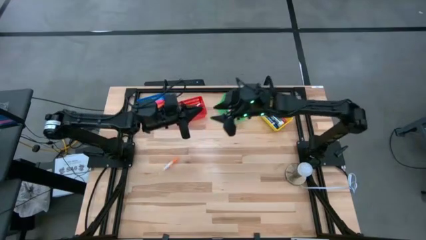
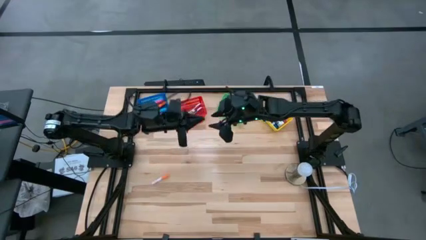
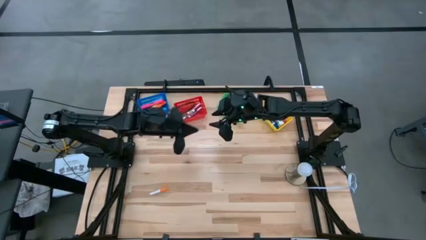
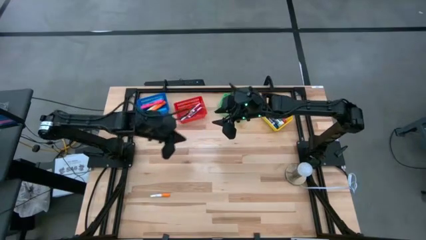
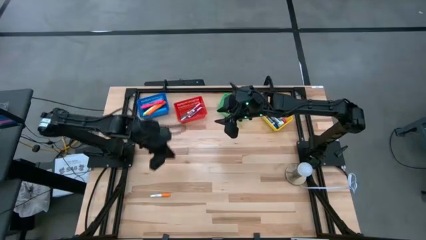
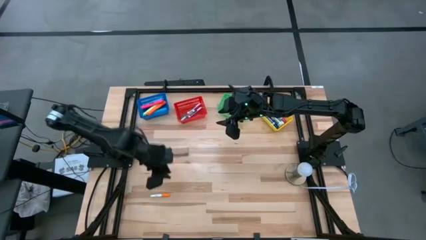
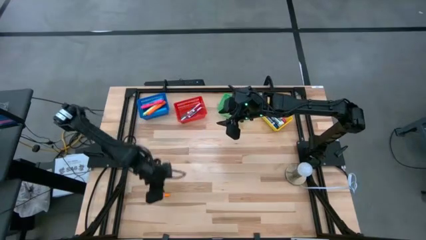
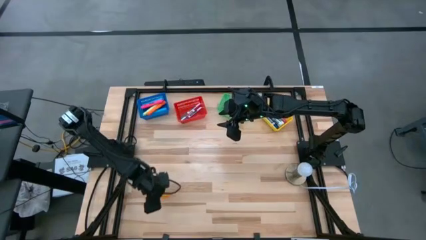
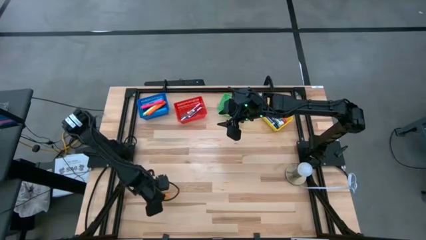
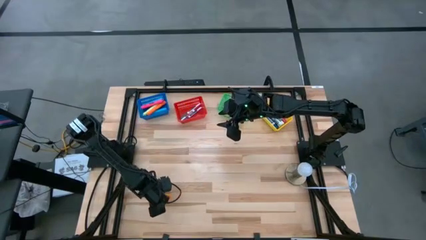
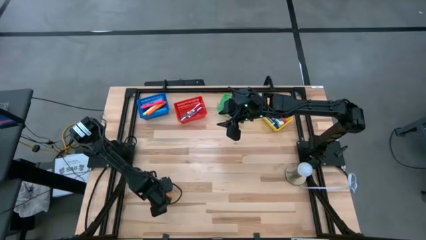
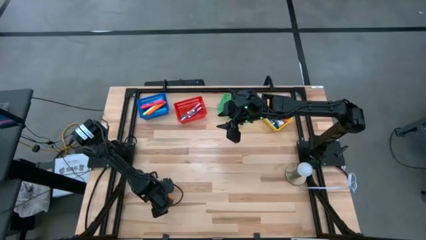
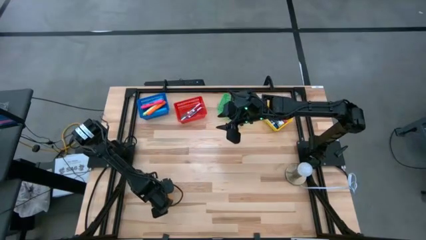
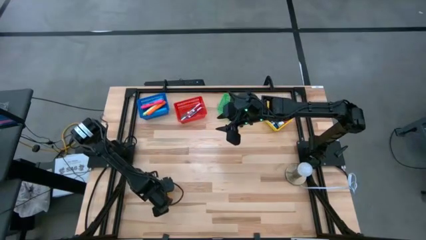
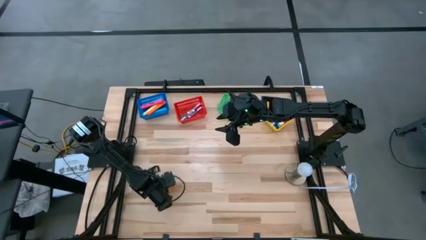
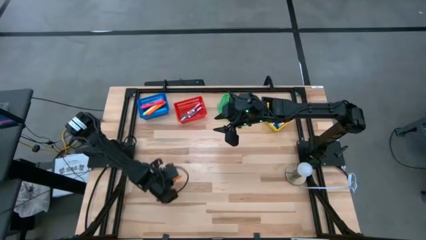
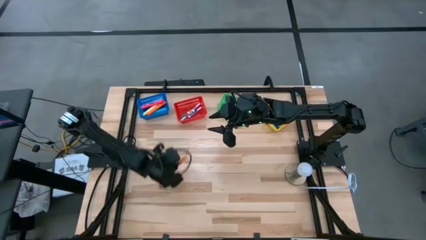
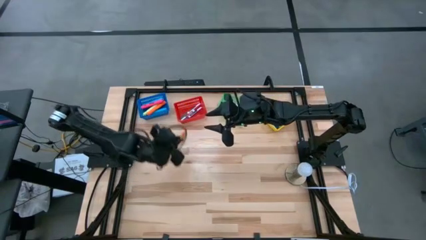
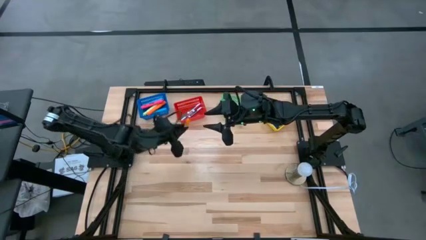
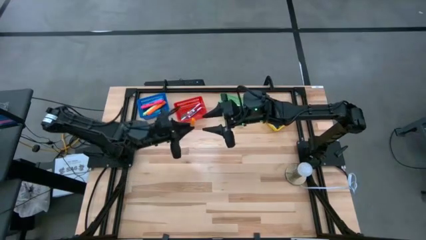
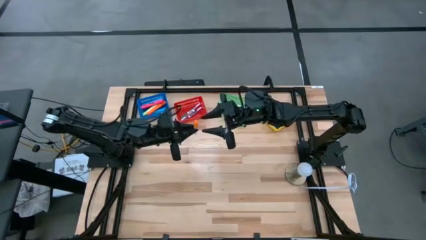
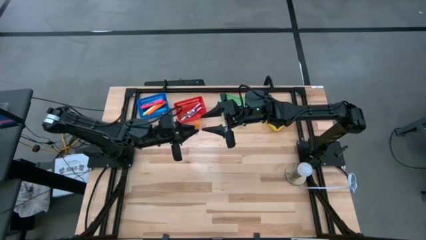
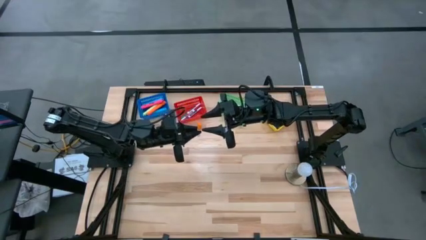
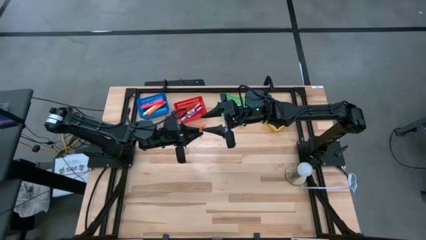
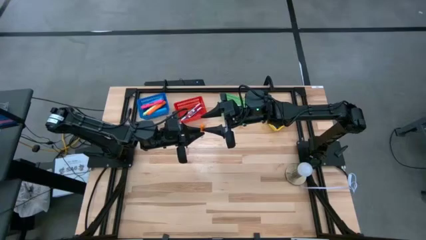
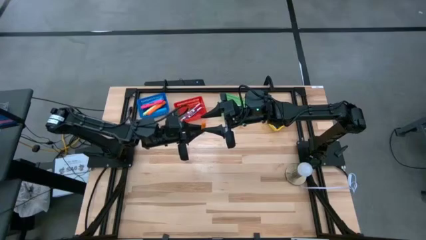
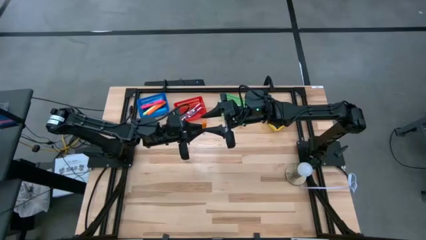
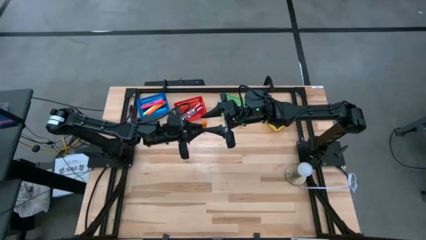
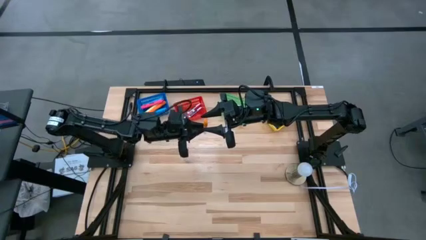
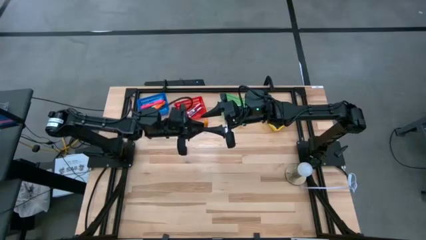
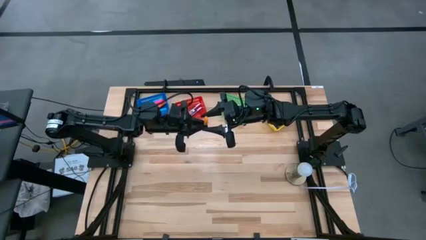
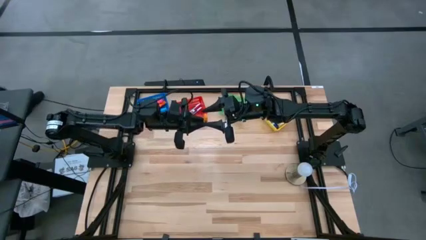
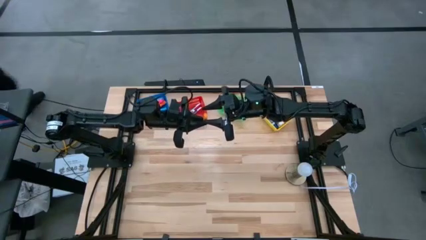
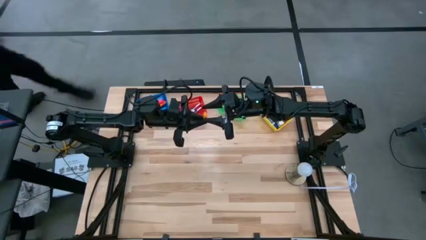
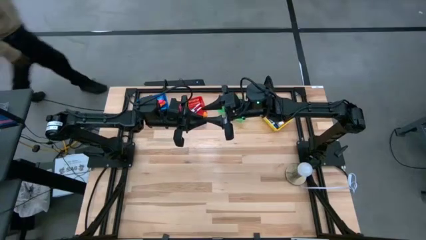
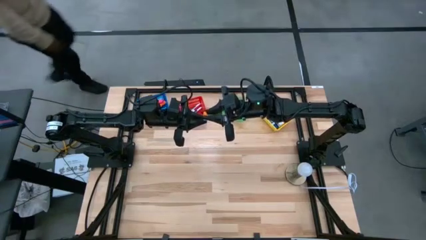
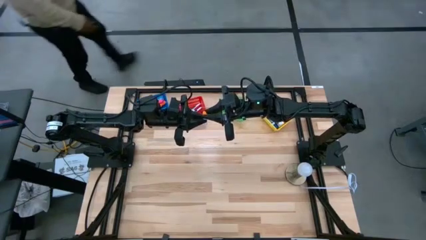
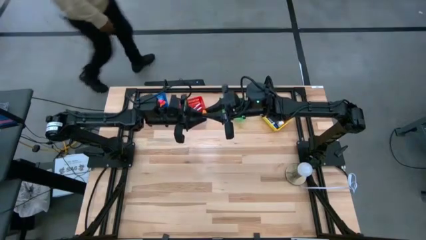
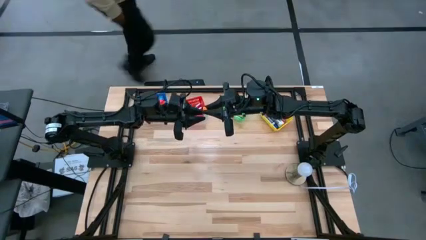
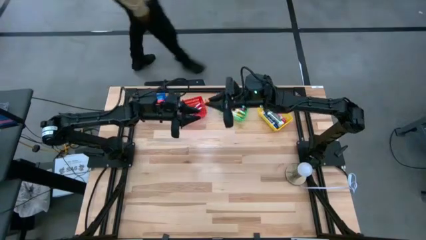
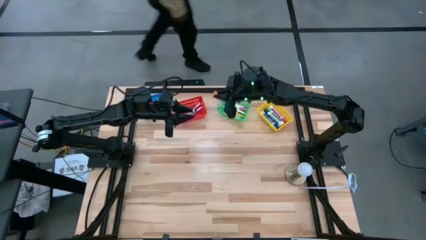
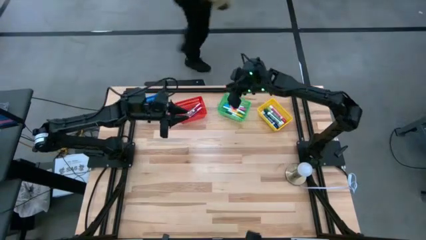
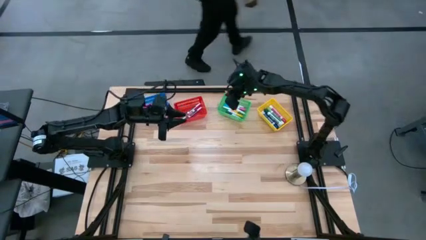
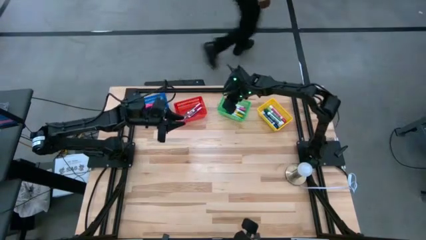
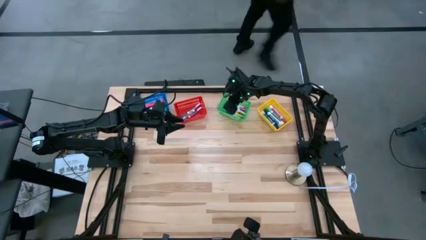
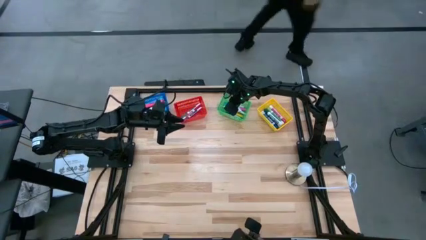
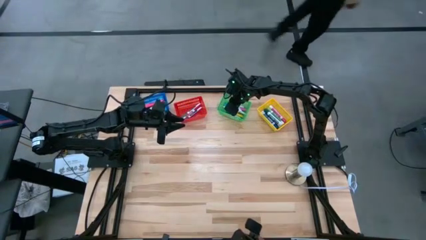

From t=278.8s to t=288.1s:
Task: Pick & Place Markers
Put the small orange highlighter pen into the green bin

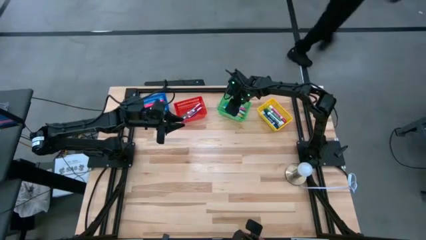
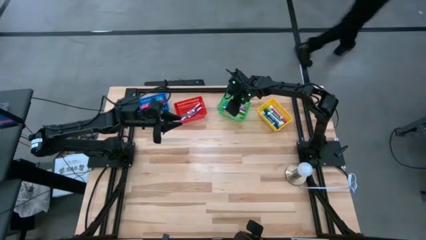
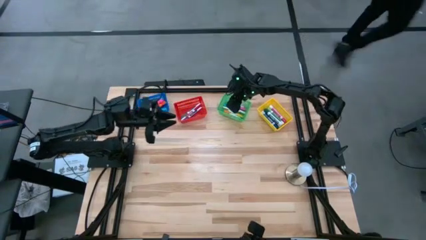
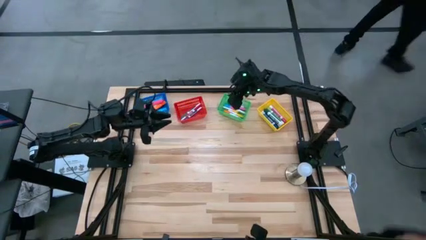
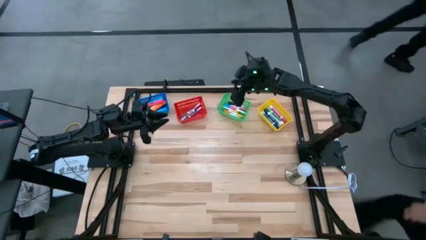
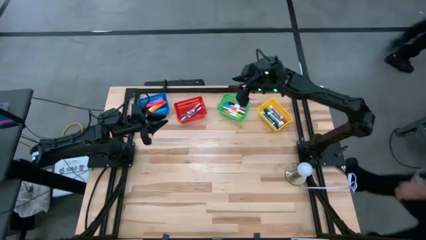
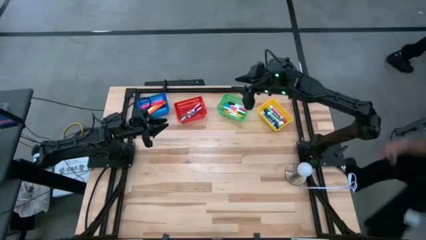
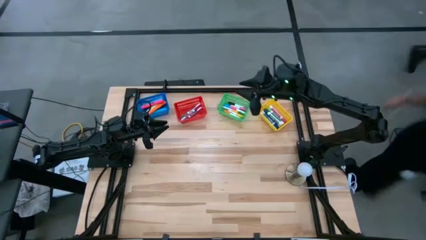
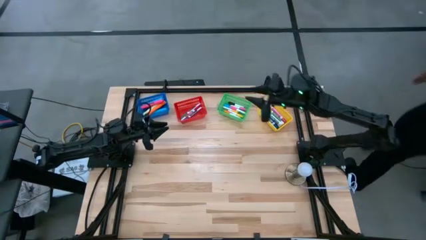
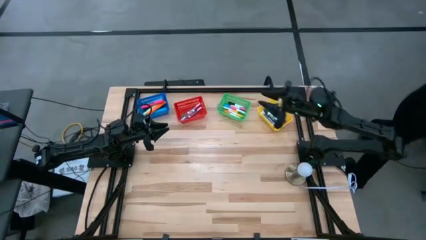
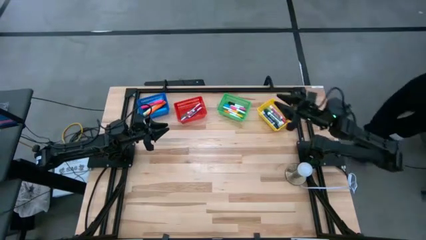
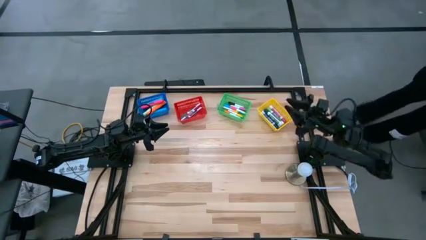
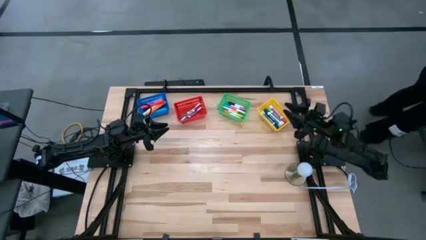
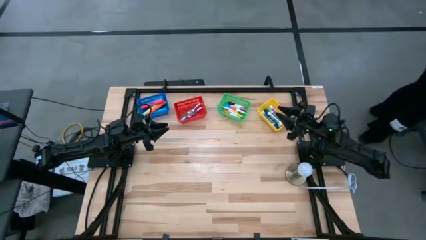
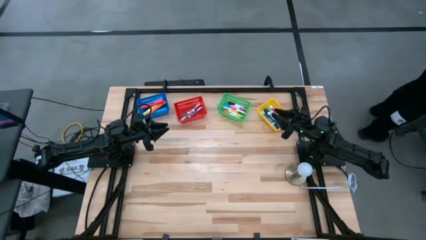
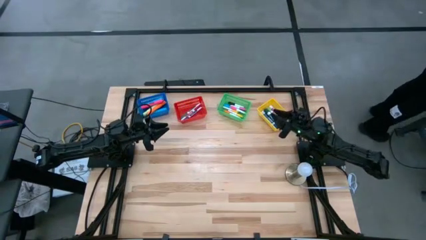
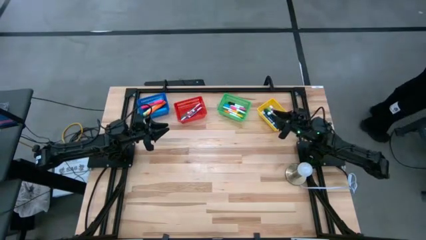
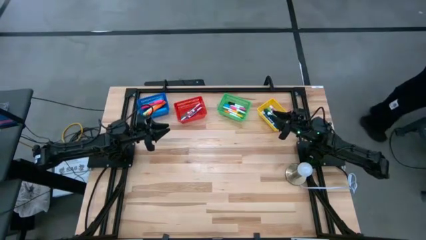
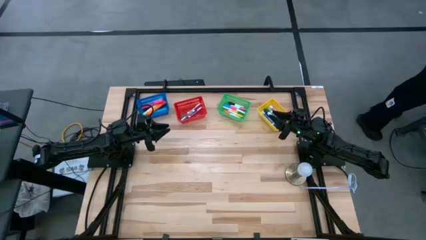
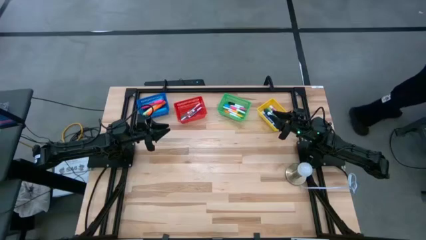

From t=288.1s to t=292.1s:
Return to Home Position

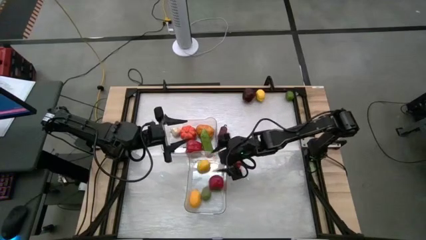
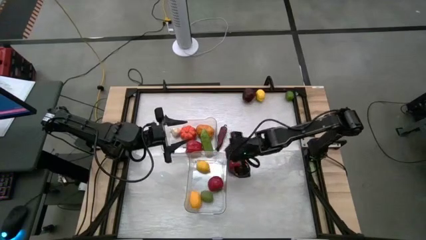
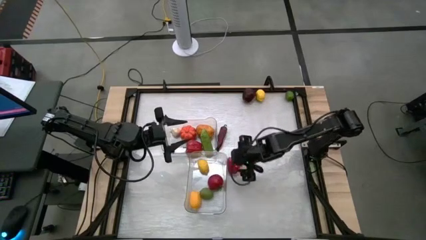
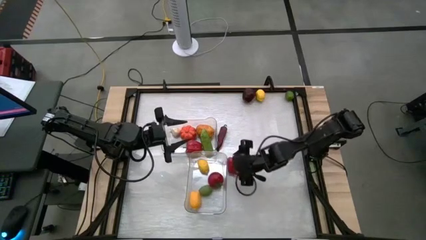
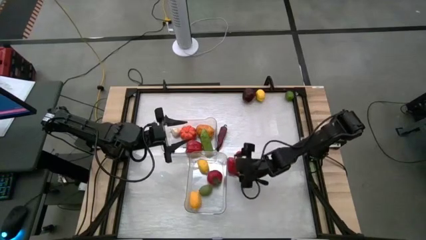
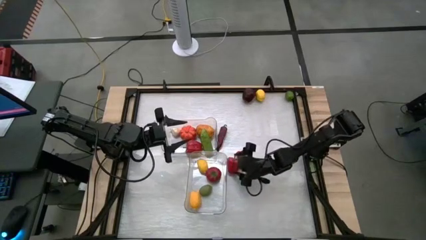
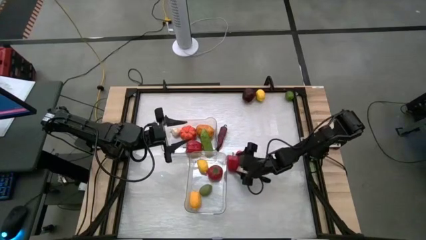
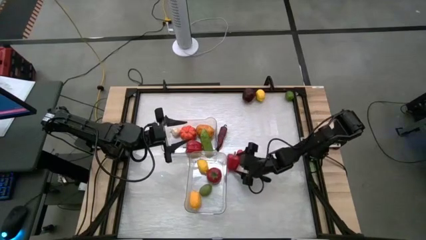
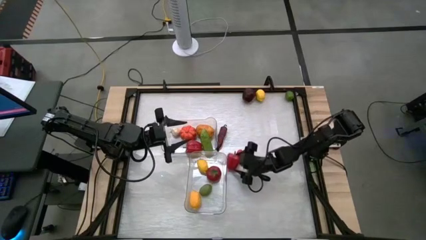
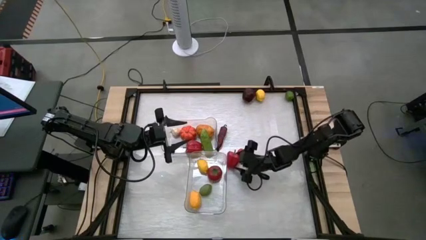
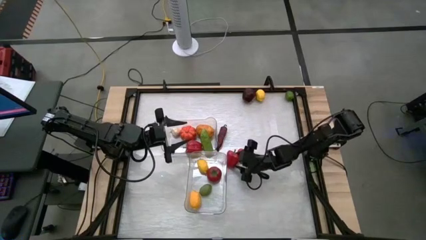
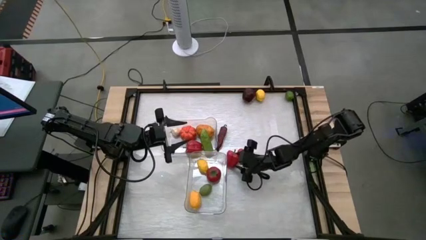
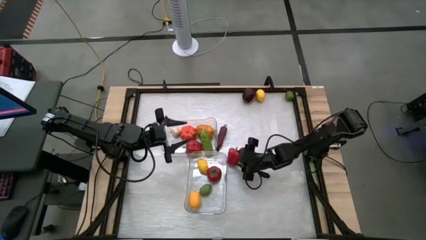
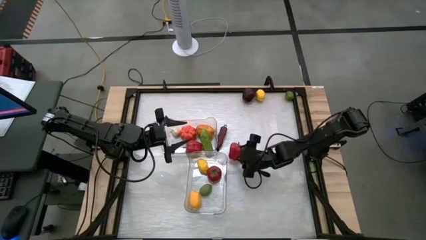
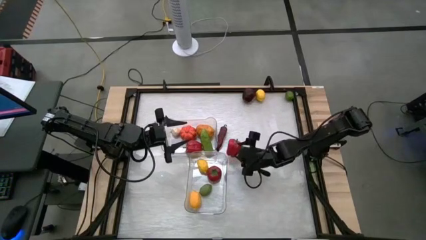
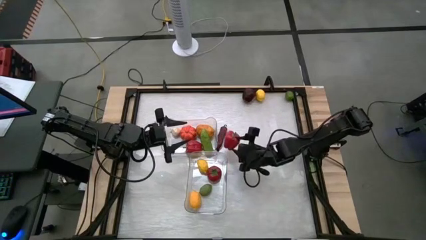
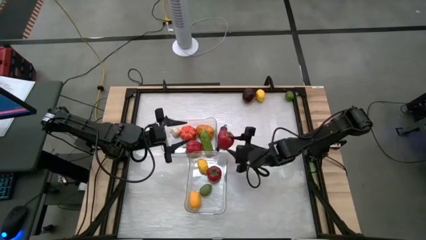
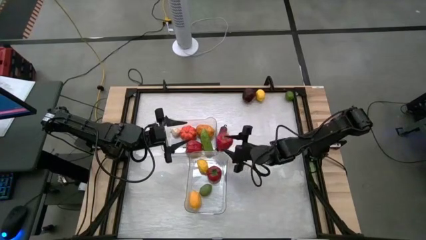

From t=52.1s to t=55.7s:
Task: Sort produce into baskets
Put the red bell pepper into the top transparent bin
